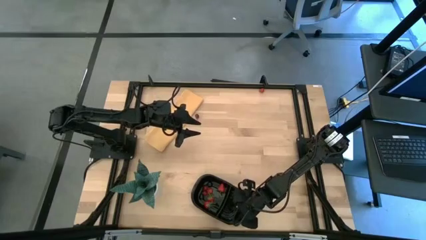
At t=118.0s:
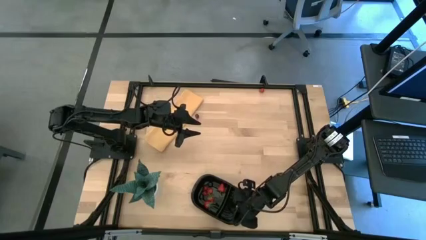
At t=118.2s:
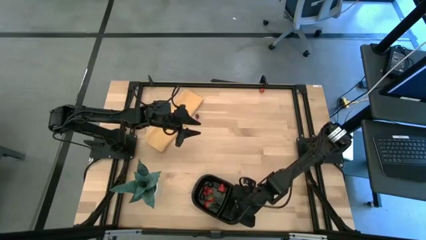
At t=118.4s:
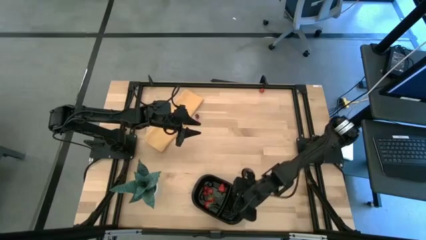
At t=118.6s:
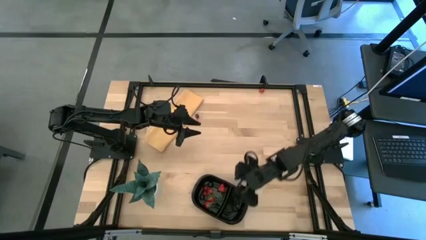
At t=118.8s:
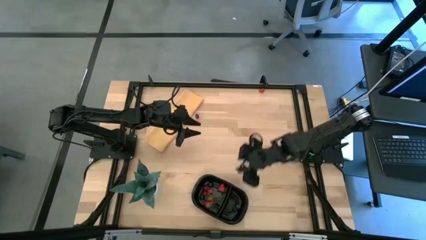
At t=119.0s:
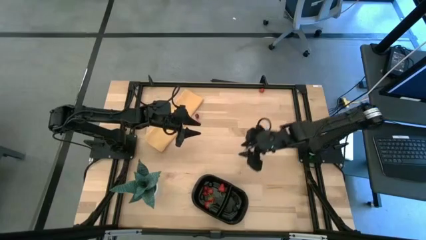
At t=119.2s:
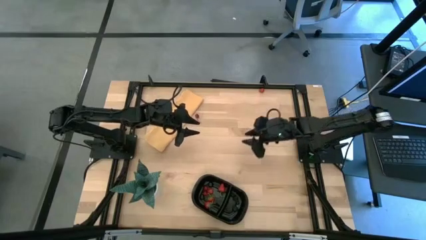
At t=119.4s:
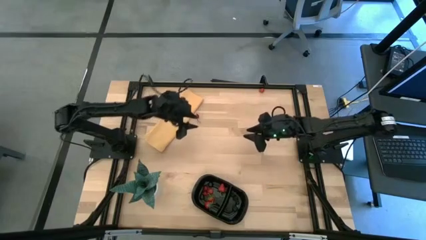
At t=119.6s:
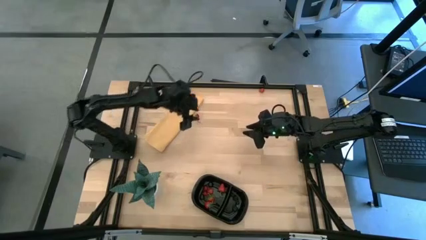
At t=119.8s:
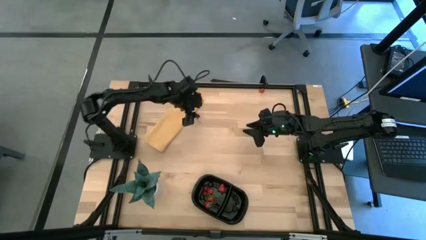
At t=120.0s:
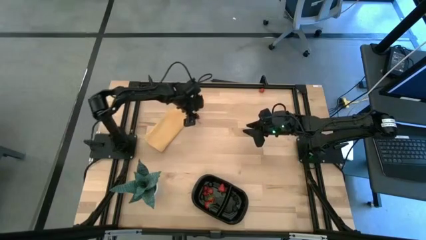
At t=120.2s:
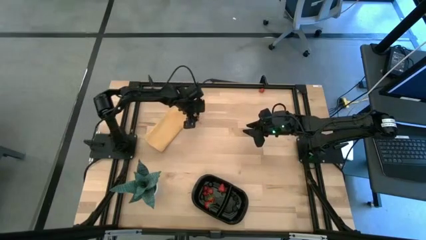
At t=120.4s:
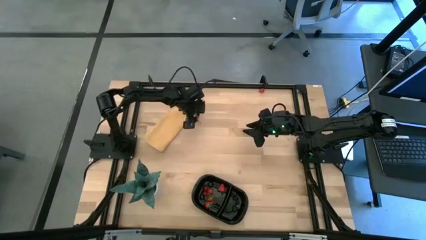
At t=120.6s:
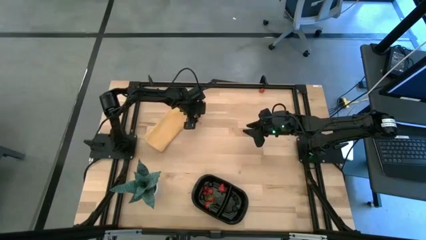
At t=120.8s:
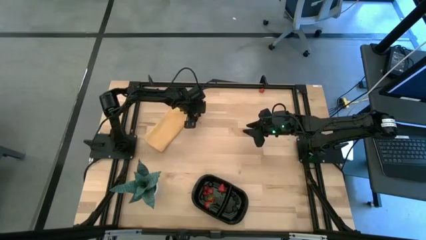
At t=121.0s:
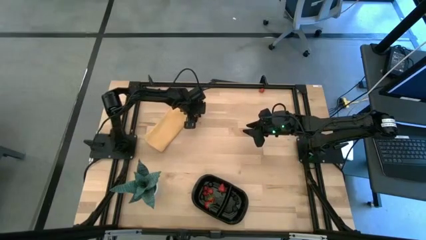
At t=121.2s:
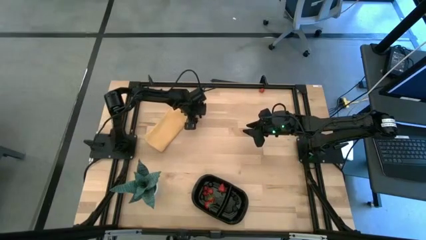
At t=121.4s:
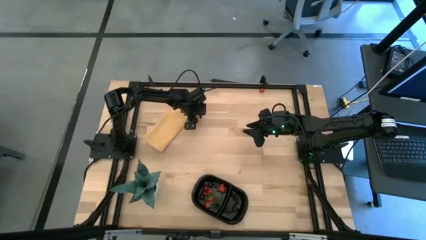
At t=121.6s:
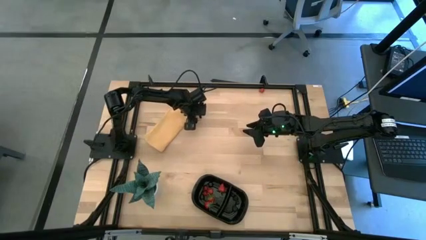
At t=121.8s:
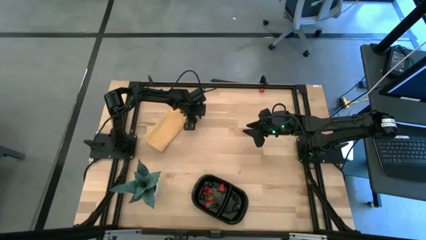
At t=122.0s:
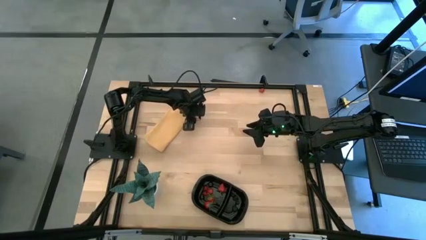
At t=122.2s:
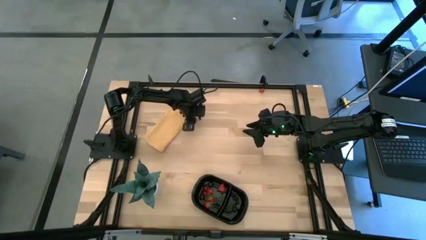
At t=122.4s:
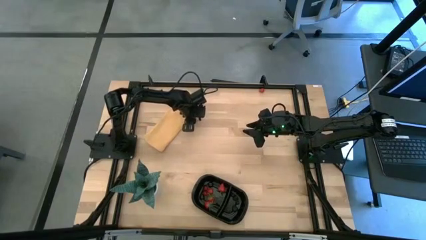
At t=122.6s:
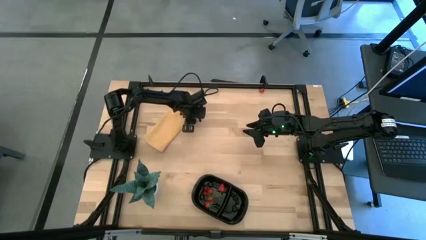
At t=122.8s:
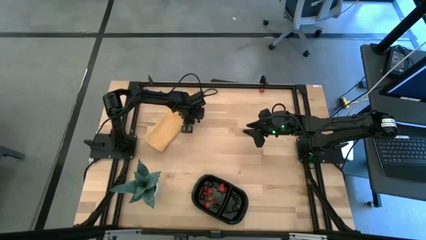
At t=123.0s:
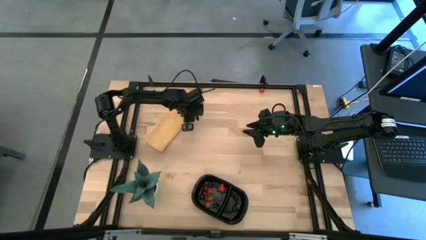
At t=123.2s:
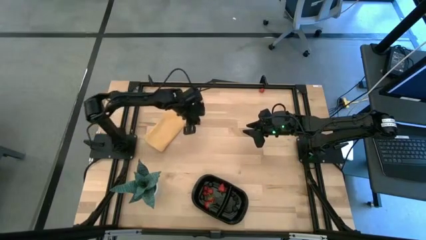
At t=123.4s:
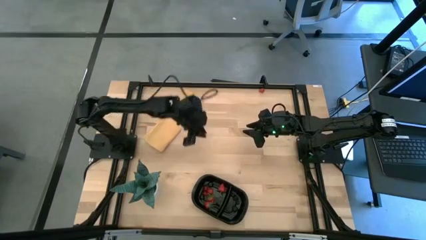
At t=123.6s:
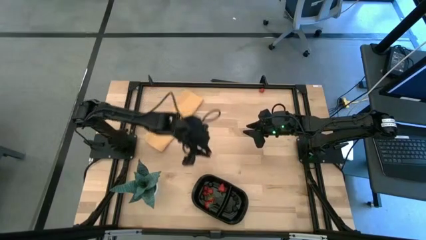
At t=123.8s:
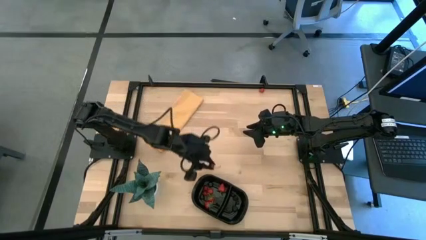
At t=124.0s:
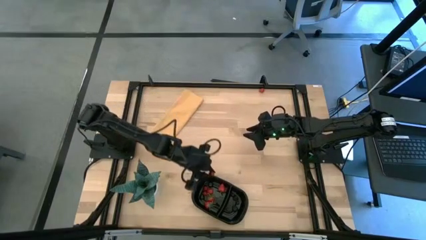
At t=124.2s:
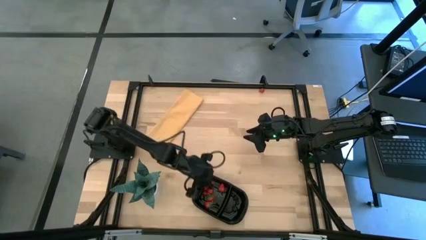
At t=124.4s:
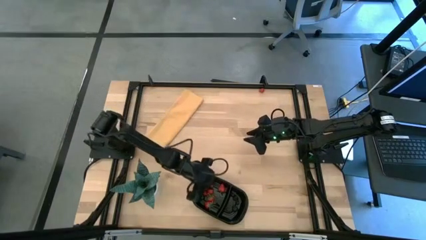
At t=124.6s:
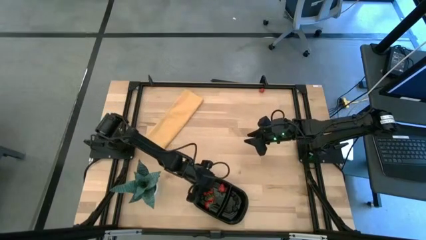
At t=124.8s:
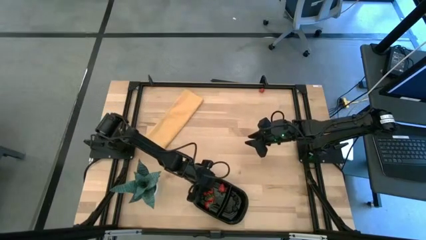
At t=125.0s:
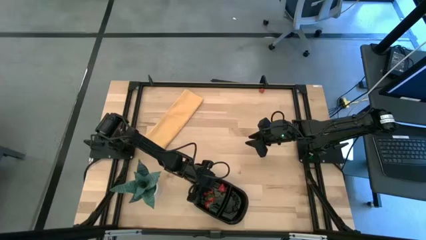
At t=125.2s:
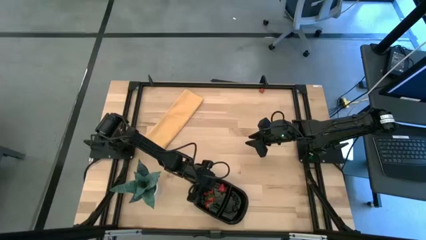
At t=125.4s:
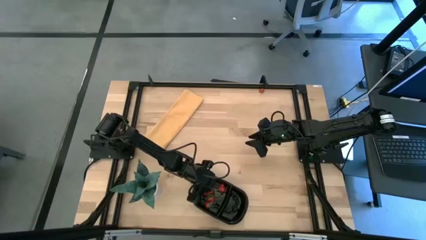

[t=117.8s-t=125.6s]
Task: Pick and placing Produce into tupperware
Put the red cherry into the black container

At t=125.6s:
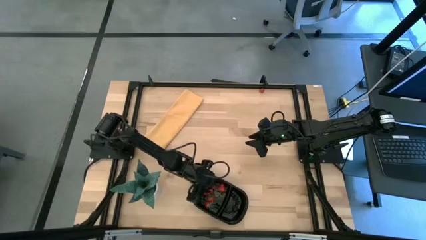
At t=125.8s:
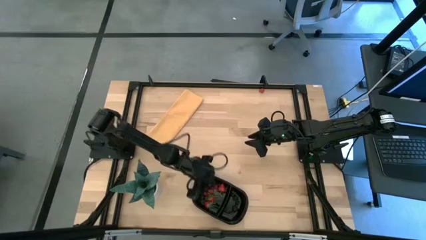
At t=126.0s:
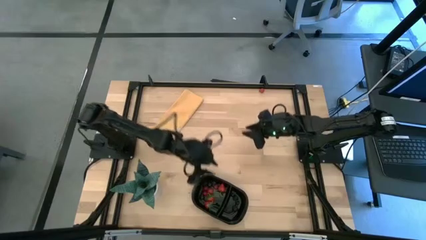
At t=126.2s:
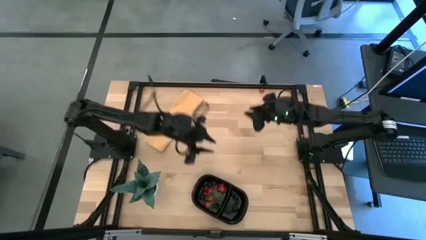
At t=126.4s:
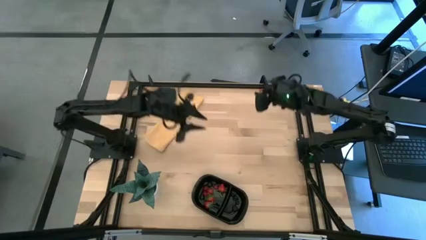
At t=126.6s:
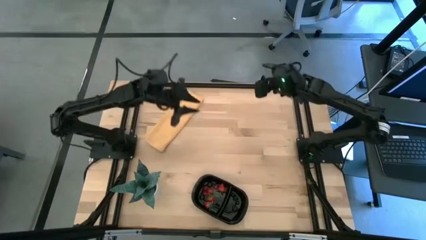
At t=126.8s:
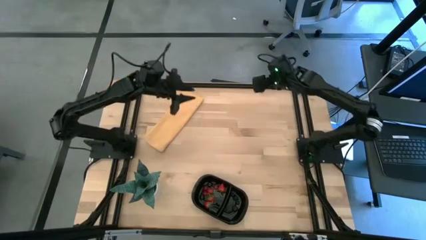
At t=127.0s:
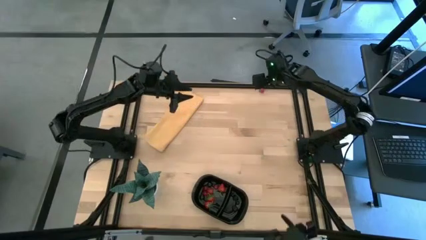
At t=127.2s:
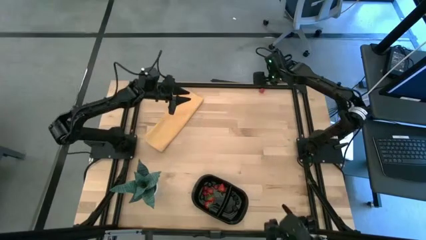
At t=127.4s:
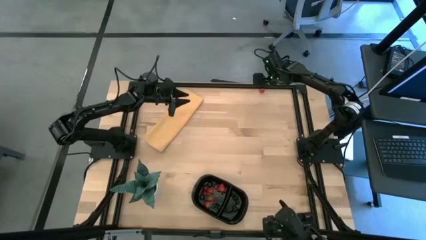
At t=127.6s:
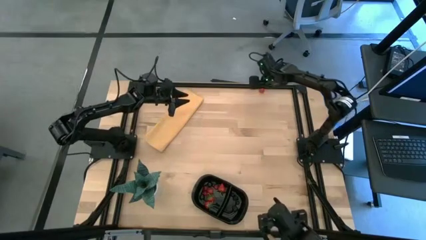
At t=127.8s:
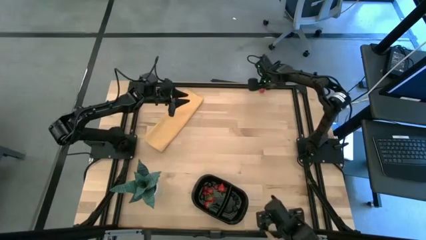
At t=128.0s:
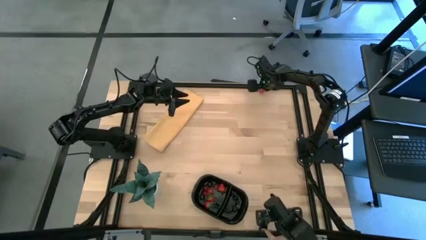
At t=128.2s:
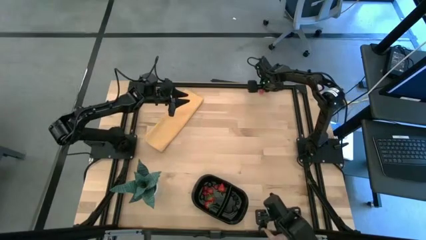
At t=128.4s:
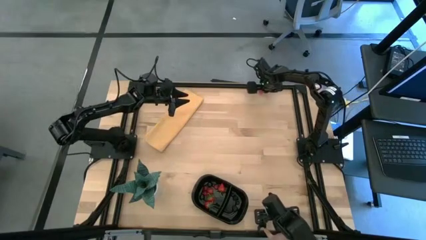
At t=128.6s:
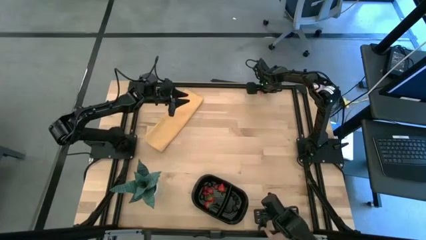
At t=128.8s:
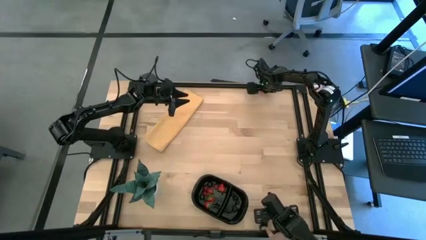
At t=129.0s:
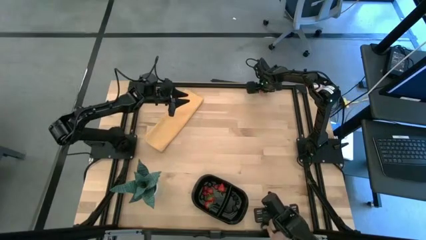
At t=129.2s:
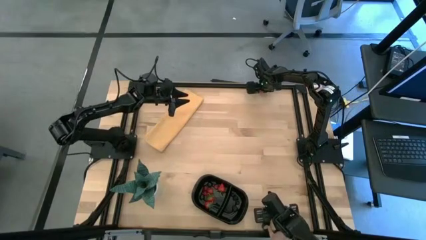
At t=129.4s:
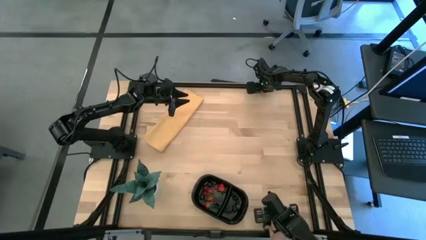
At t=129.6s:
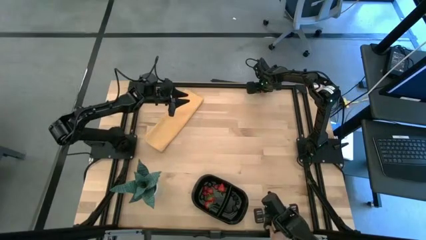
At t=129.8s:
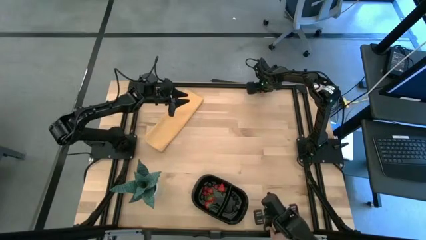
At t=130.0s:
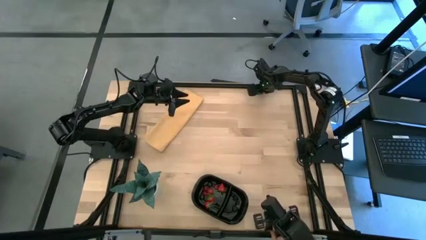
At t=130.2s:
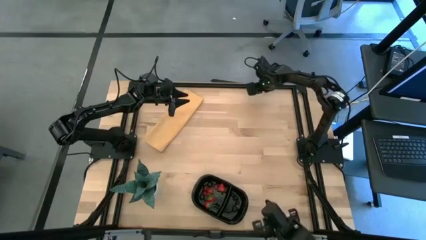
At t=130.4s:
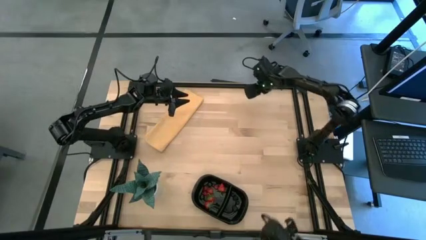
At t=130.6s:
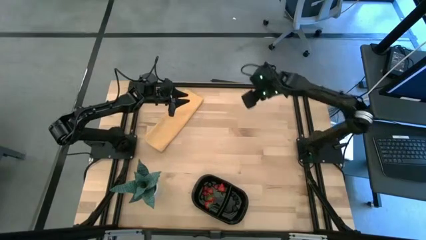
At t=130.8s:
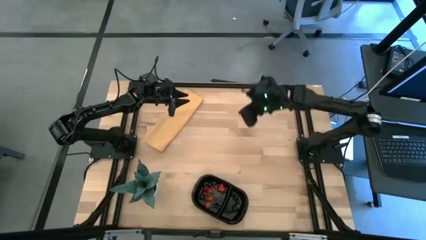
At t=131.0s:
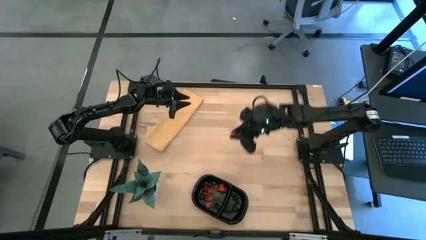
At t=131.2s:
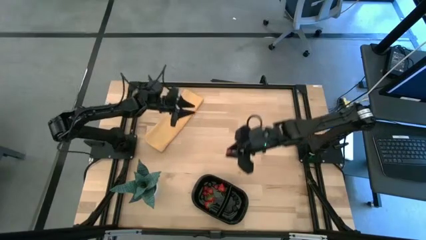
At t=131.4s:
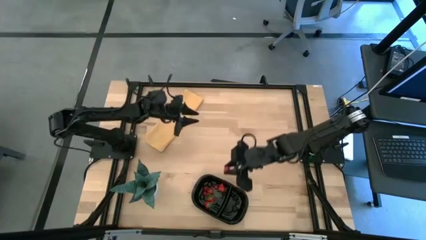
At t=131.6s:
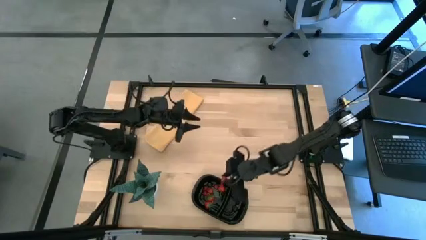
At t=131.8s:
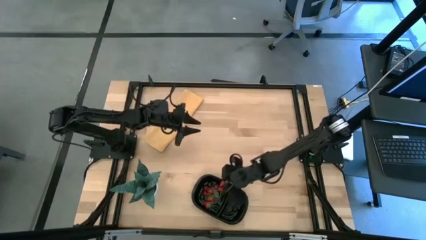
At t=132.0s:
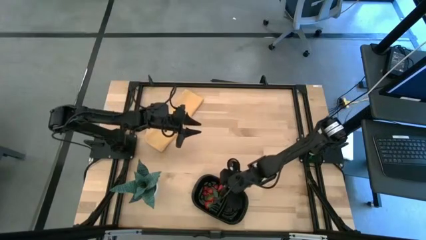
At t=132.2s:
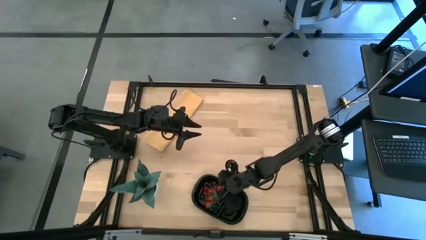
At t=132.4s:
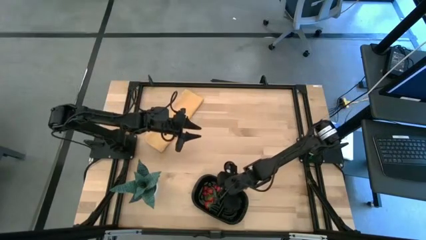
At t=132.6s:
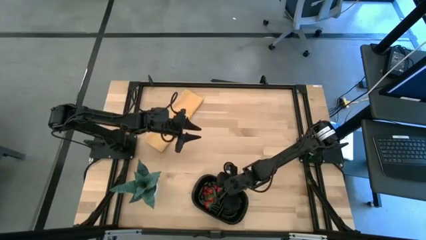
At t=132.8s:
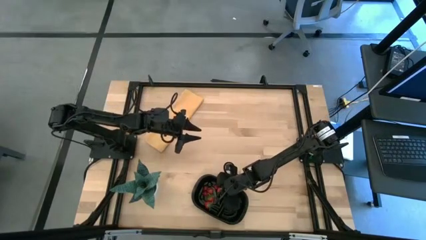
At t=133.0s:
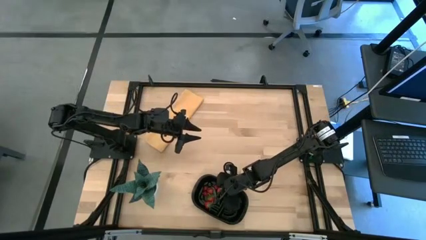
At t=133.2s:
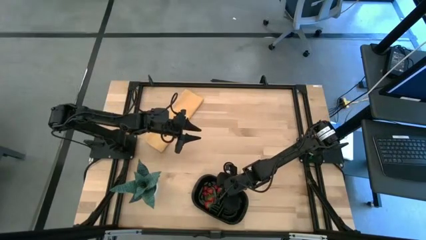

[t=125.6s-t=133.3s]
Put the red raspberry into the black container
